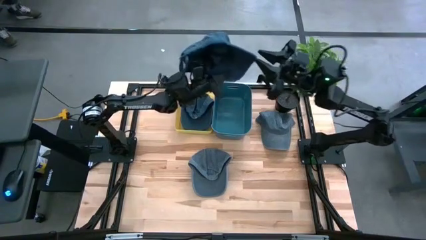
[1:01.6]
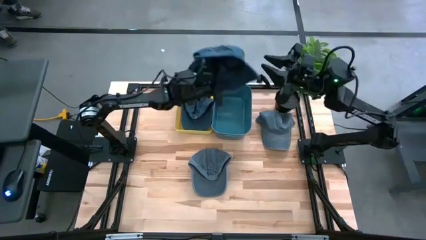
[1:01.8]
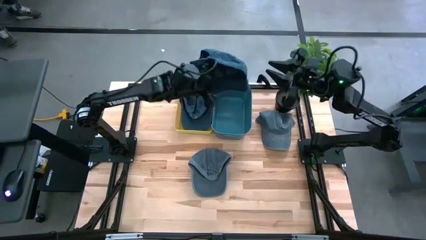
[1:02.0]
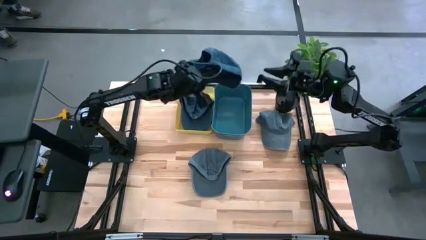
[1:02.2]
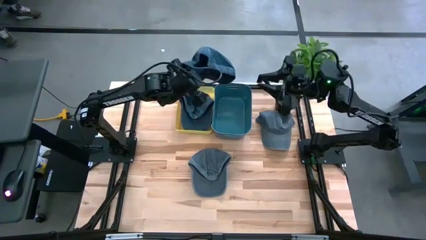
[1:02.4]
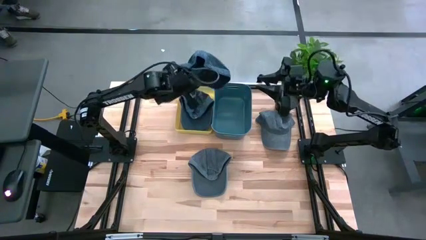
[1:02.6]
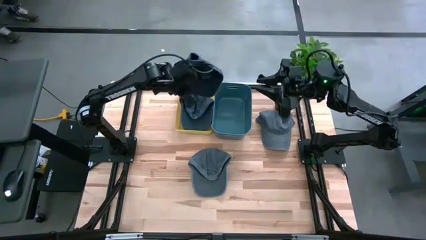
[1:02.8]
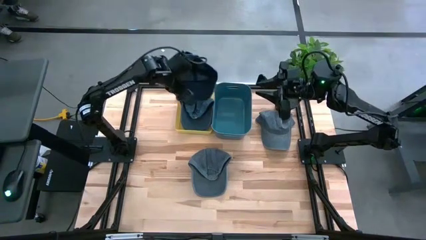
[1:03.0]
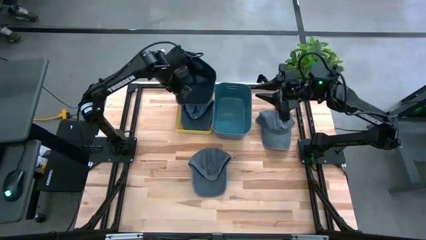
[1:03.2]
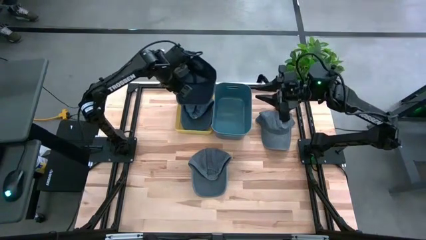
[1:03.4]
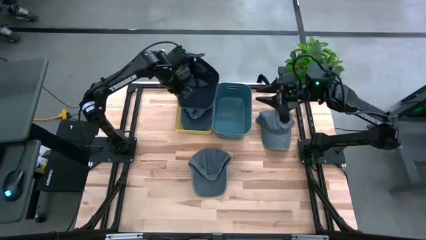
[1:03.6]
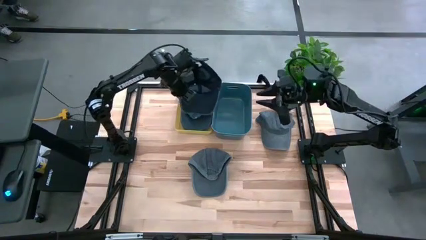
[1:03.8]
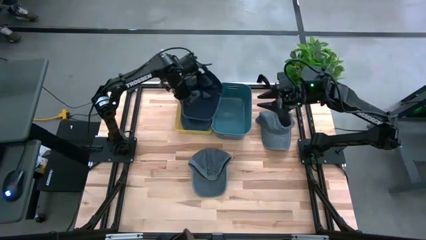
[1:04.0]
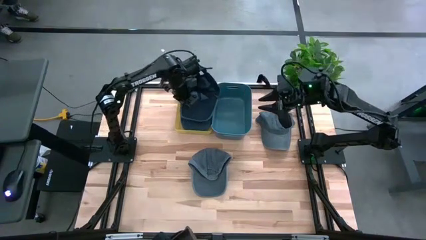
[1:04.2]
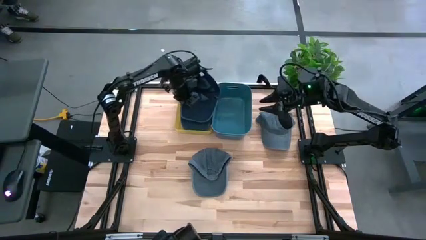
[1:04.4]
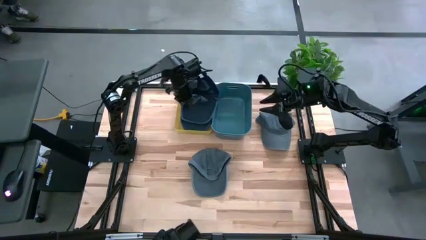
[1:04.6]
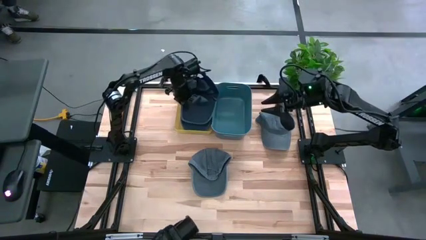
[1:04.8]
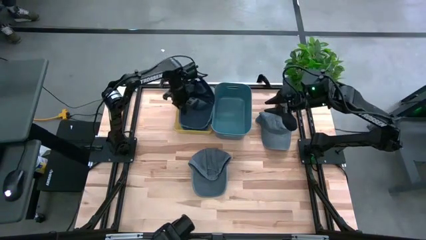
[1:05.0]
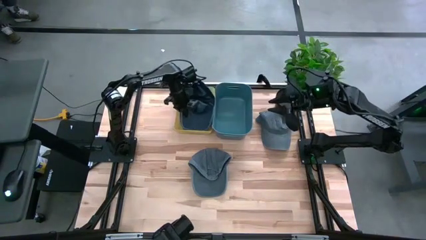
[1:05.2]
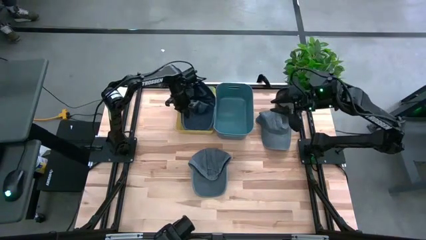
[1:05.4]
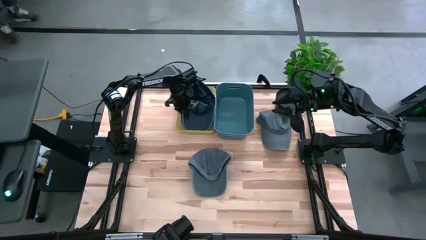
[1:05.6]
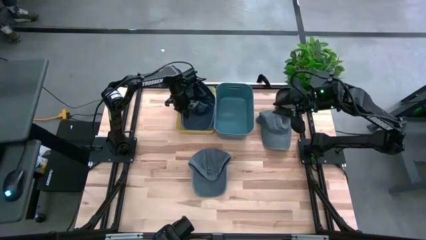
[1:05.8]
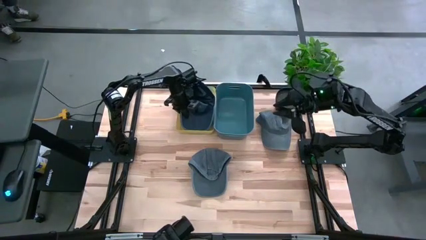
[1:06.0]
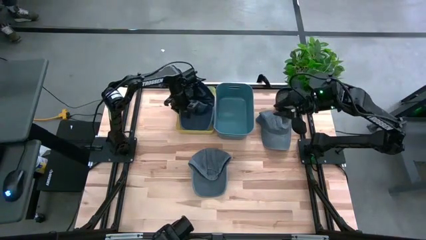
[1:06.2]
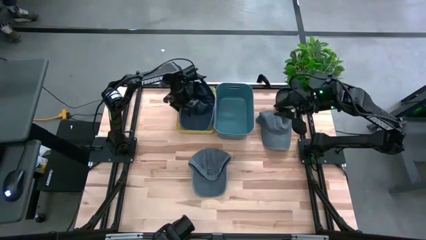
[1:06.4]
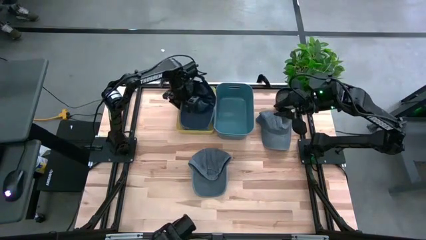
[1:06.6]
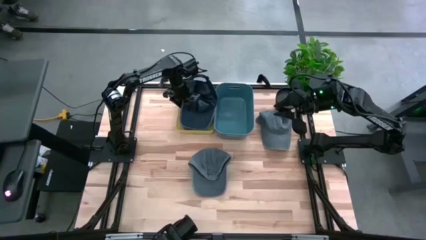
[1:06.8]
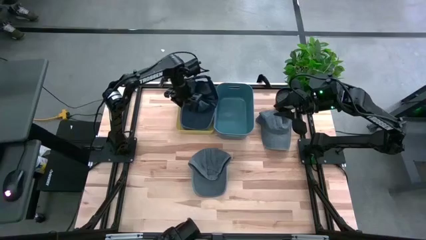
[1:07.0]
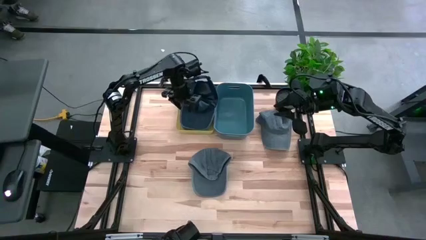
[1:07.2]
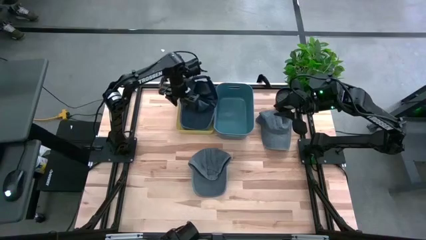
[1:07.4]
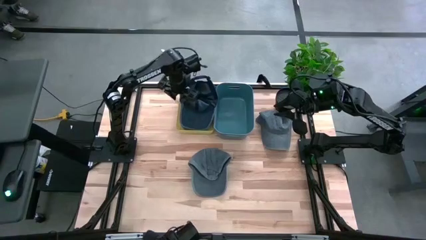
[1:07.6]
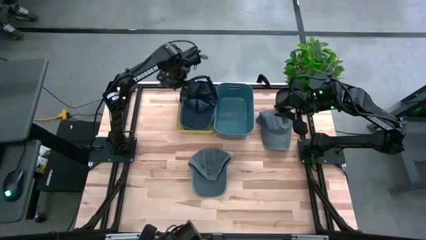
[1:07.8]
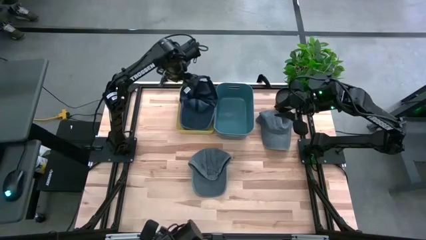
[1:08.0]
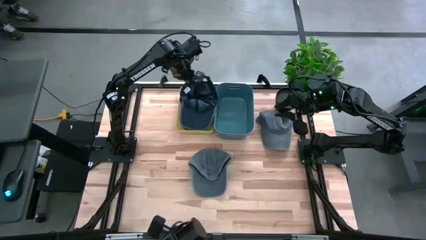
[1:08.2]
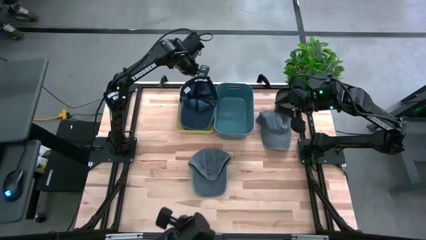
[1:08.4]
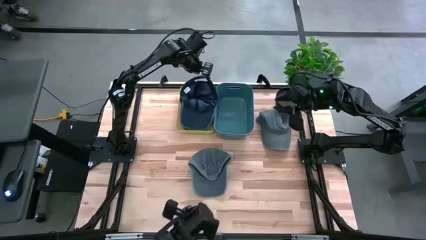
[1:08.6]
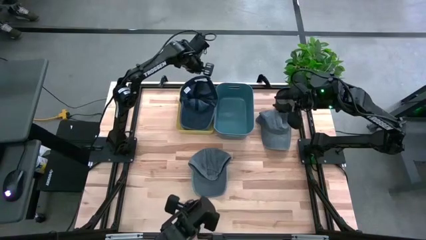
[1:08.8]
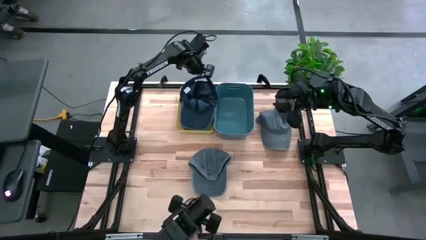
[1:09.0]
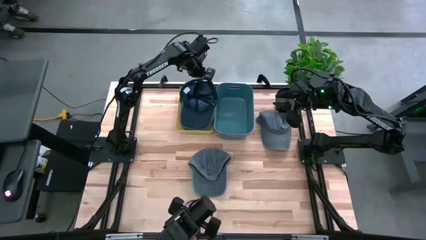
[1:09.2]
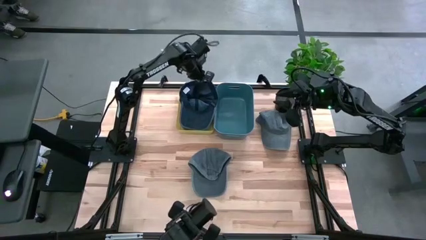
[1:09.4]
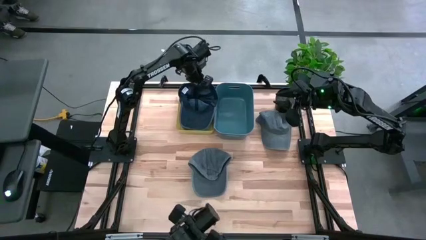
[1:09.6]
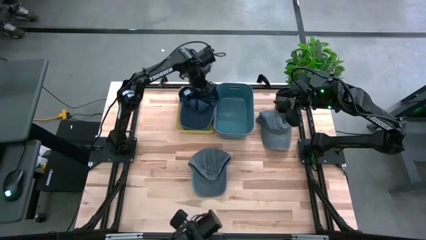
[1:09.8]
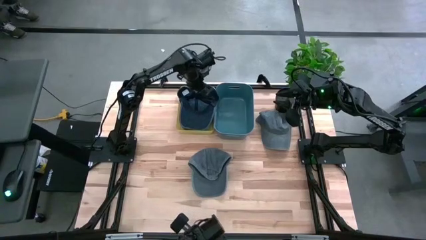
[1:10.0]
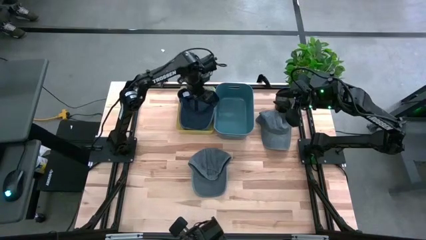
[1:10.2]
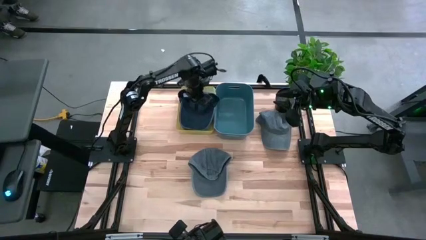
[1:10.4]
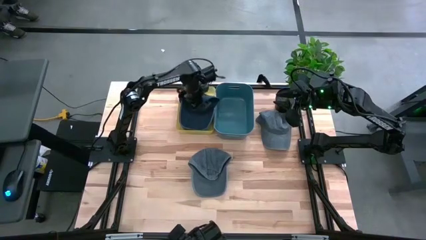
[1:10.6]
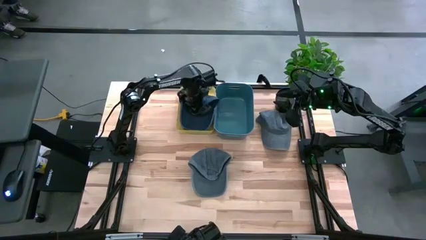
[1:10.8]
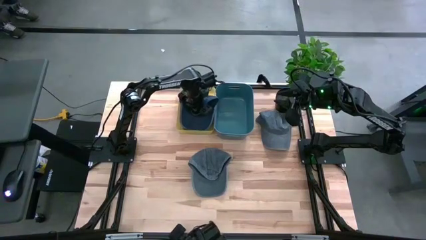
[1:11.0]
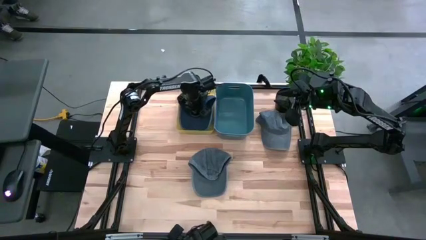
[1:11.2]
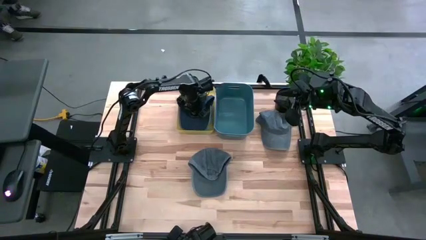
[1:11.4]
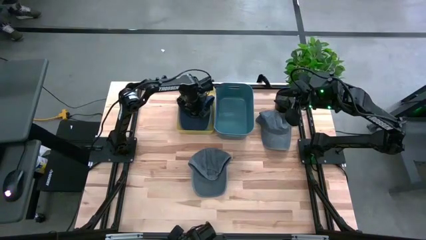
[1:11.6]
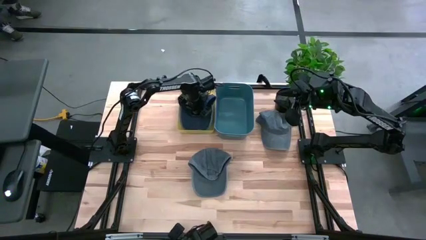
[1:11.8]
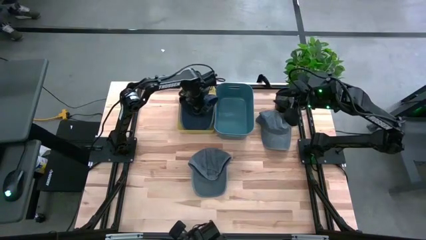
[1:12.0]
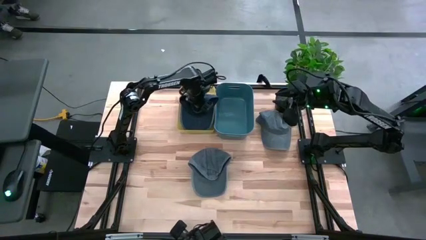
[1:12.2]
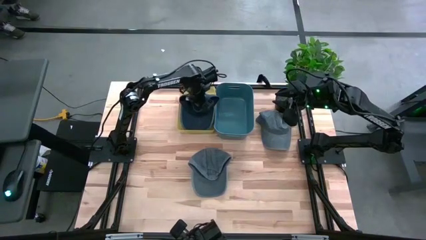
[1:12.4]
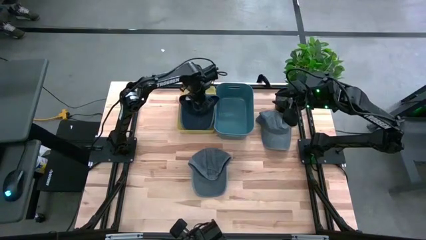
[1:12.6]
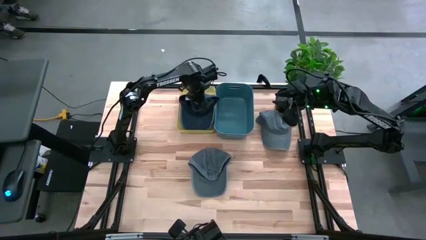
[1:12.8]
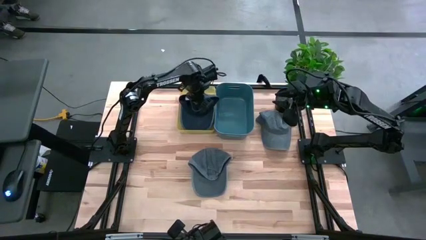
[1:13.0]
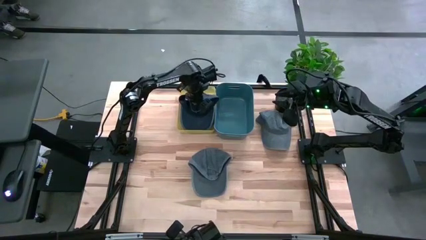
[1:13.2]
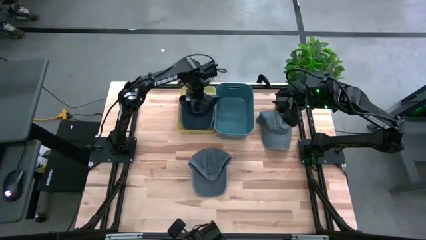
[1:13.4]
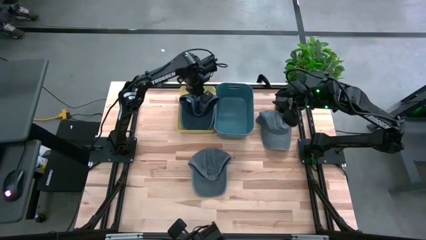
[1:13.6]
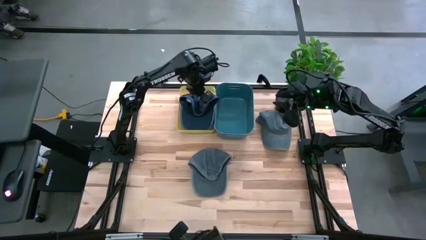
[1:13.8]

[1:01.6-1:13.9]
Task: Pick & Place hat
Put the blue cap into the yellow bin
